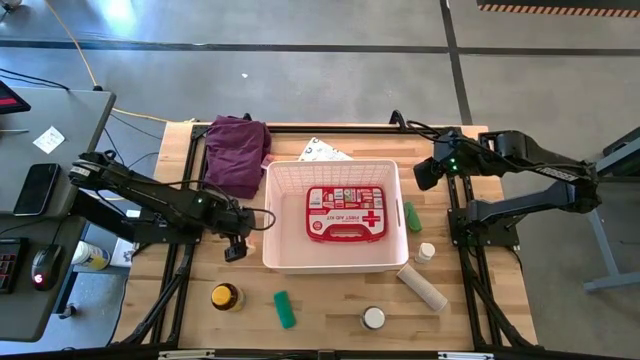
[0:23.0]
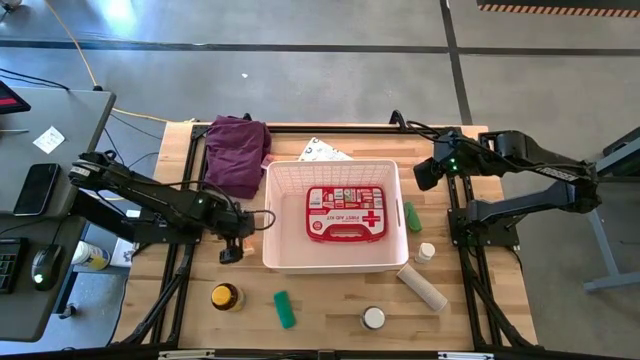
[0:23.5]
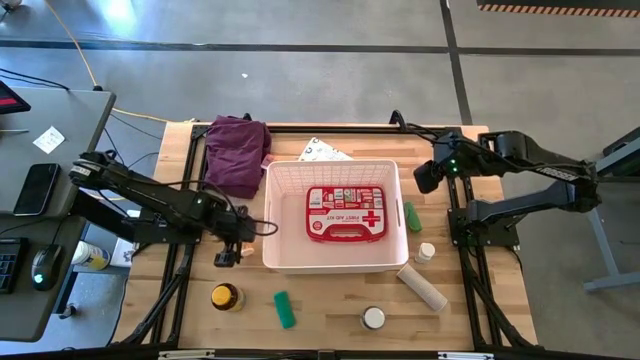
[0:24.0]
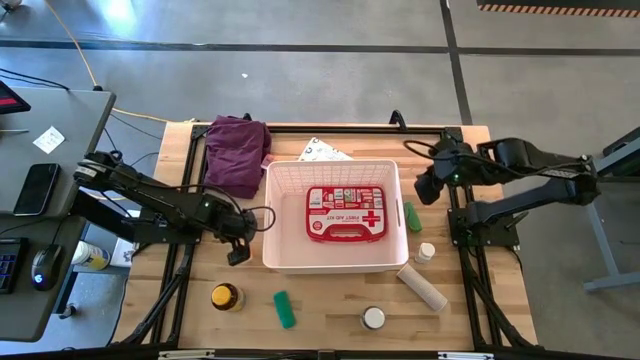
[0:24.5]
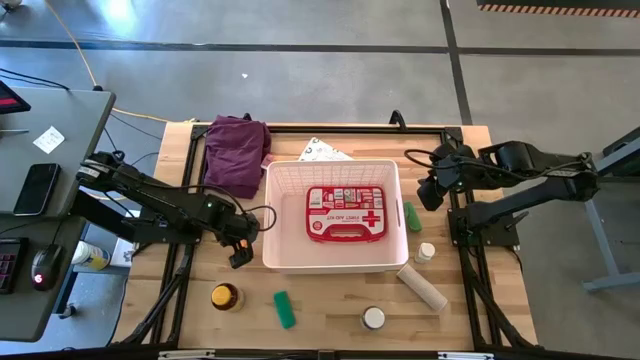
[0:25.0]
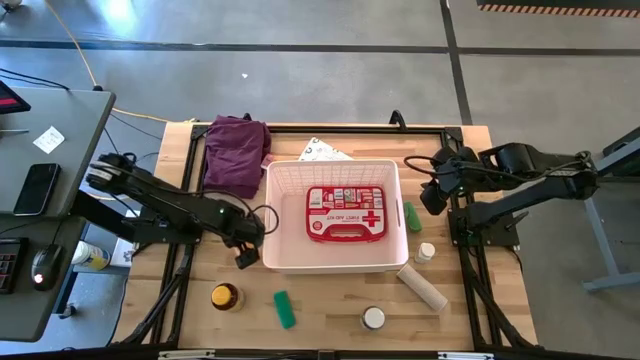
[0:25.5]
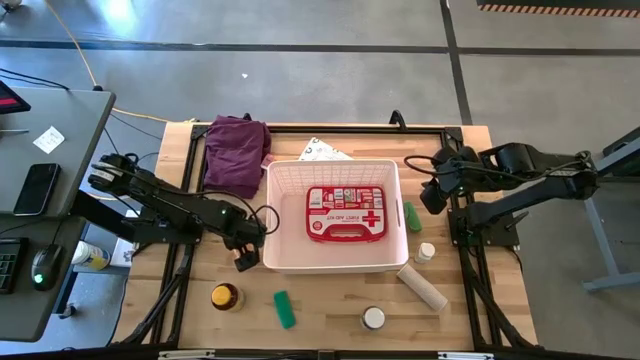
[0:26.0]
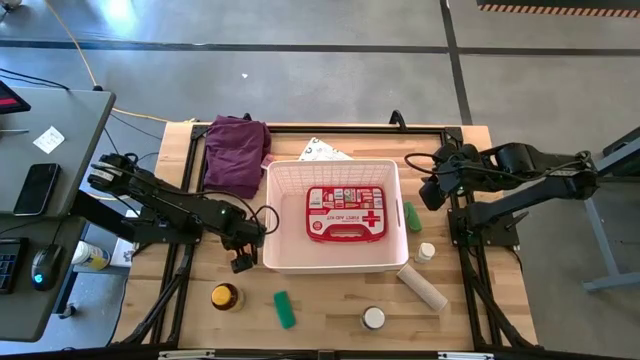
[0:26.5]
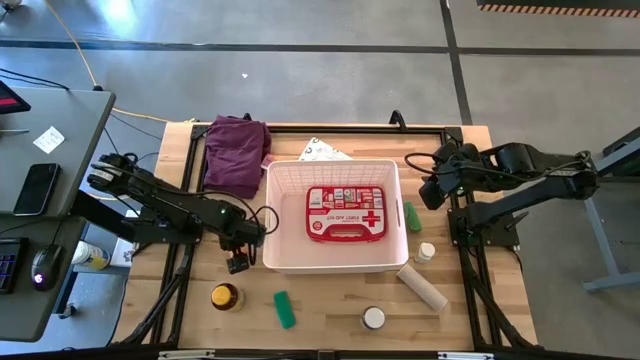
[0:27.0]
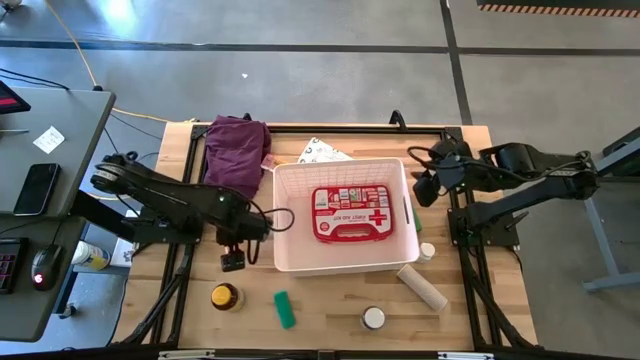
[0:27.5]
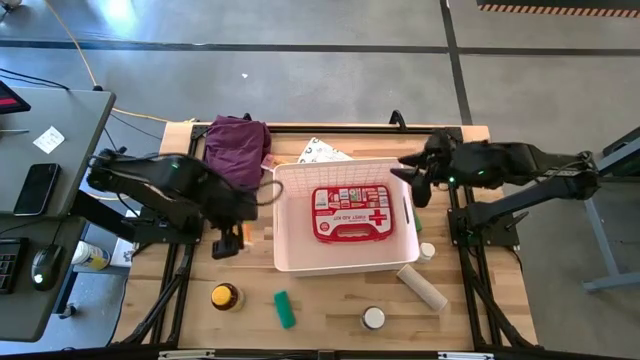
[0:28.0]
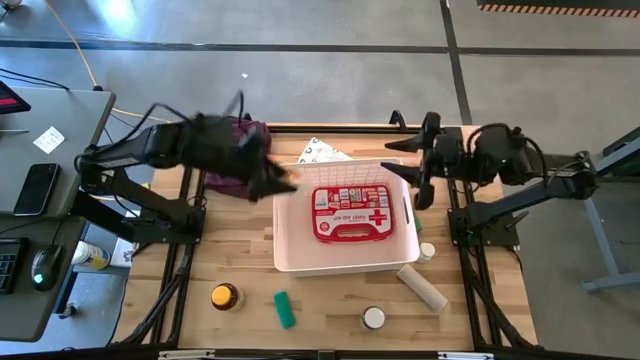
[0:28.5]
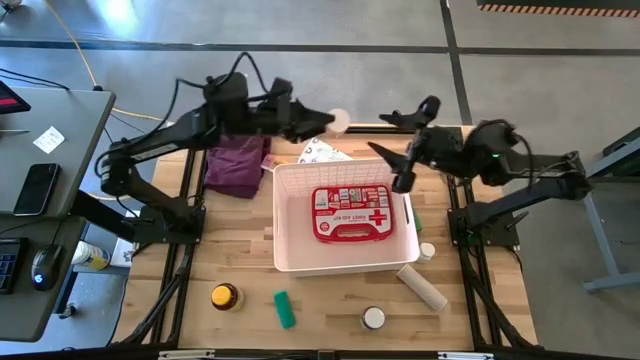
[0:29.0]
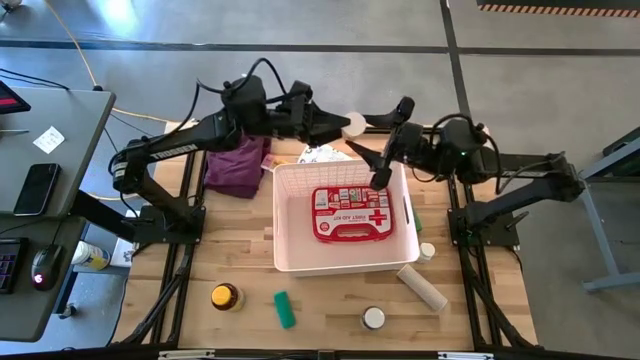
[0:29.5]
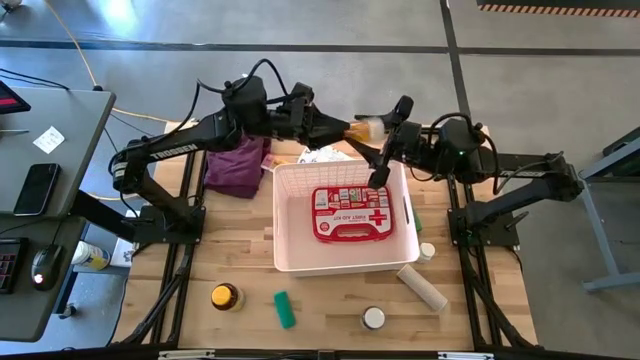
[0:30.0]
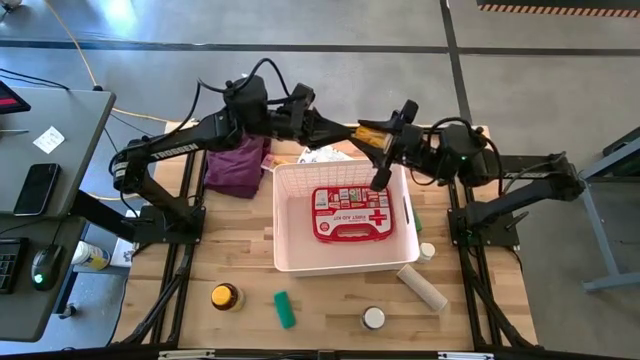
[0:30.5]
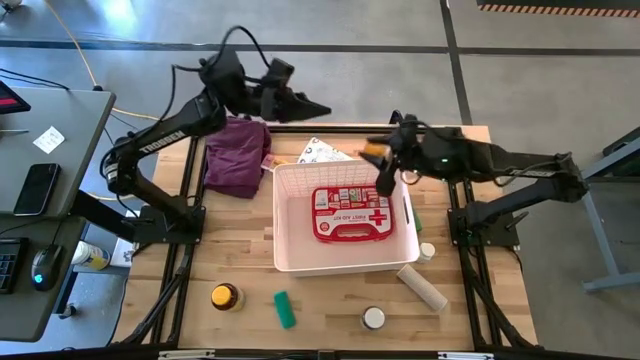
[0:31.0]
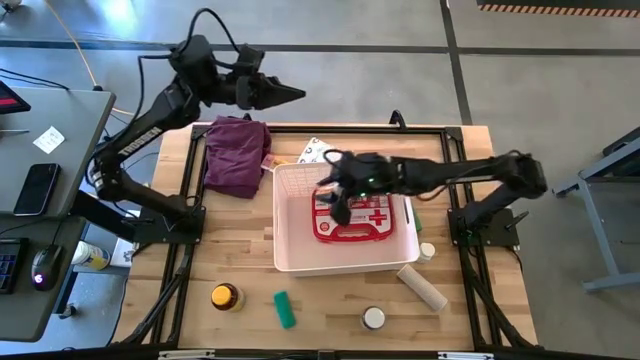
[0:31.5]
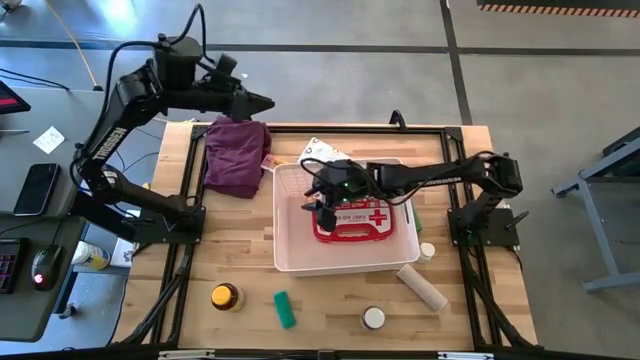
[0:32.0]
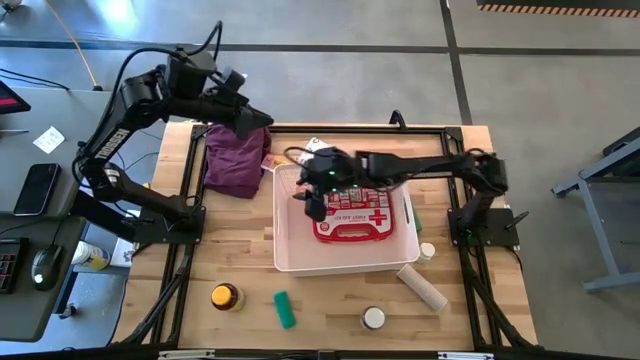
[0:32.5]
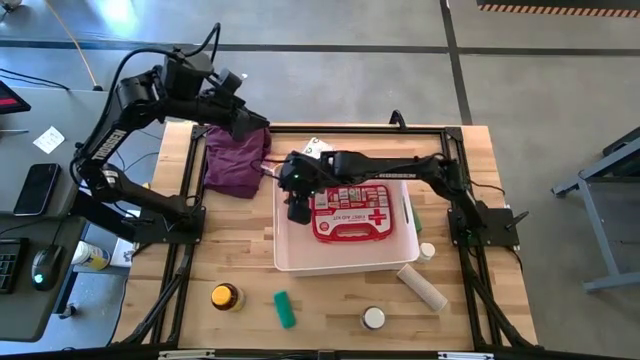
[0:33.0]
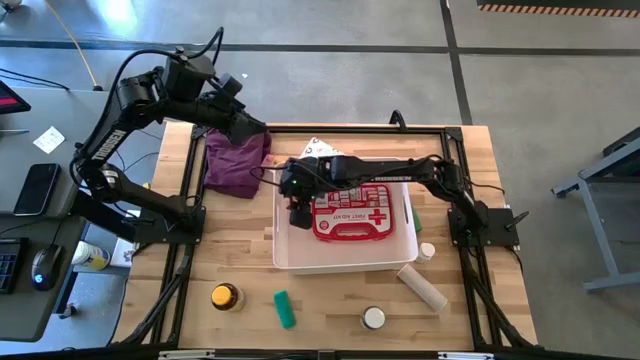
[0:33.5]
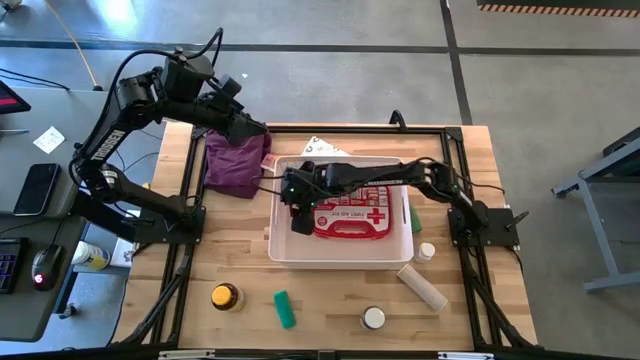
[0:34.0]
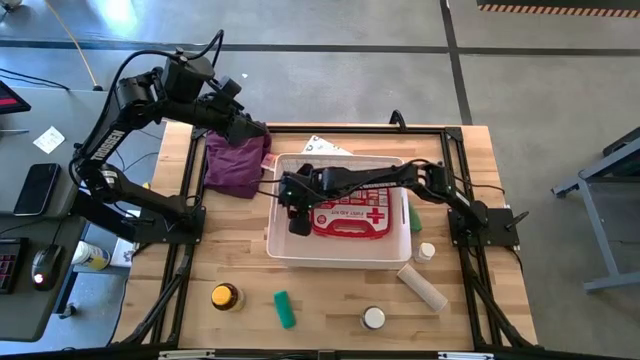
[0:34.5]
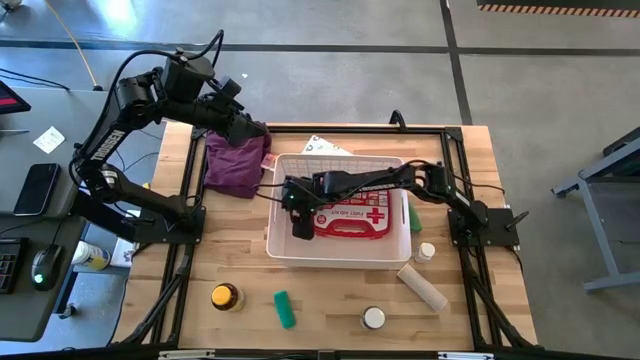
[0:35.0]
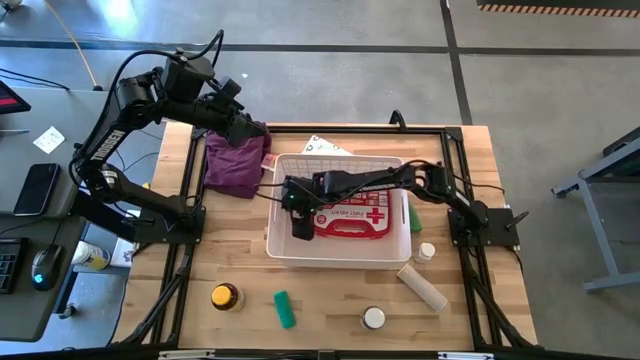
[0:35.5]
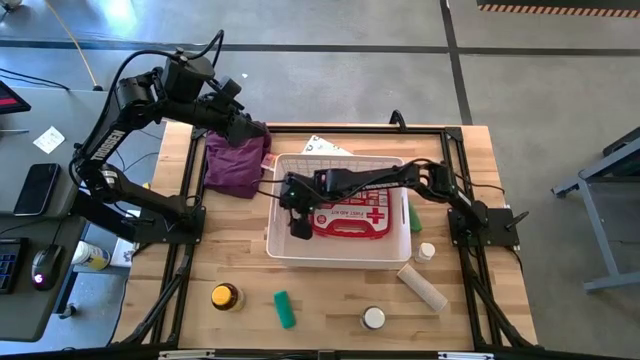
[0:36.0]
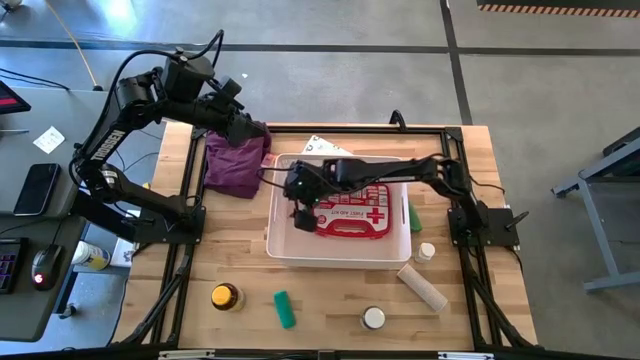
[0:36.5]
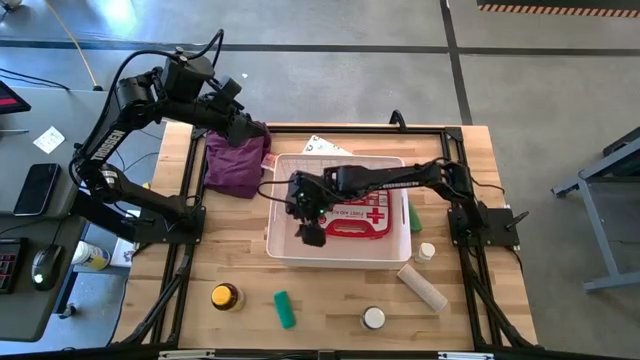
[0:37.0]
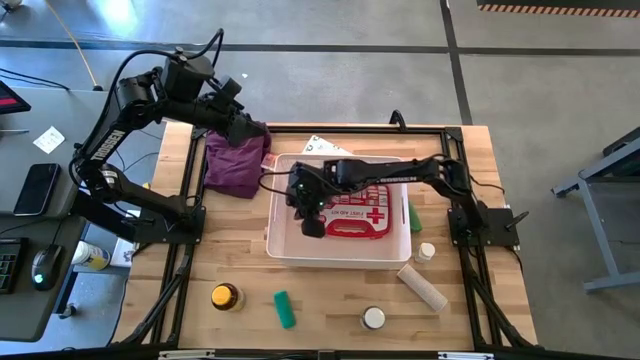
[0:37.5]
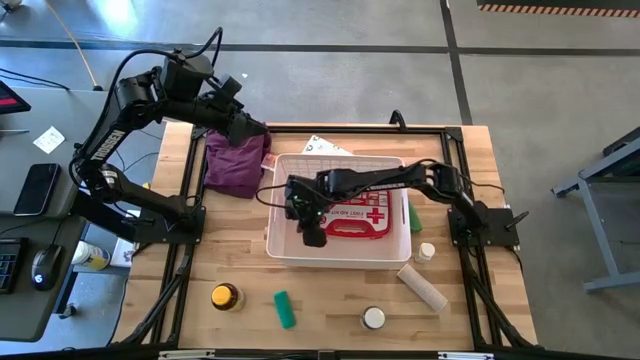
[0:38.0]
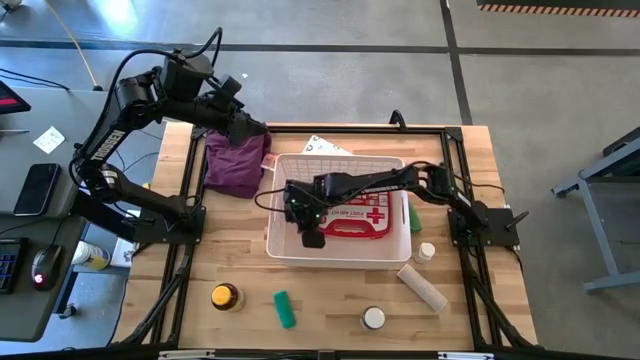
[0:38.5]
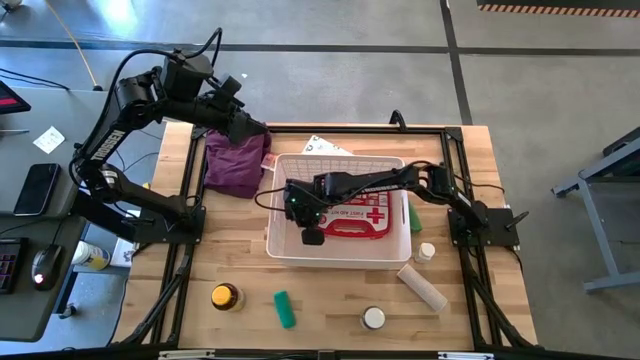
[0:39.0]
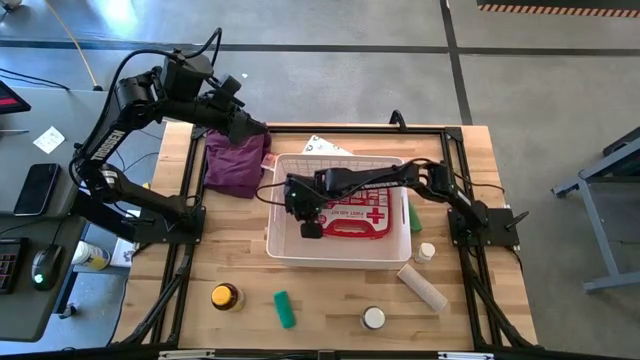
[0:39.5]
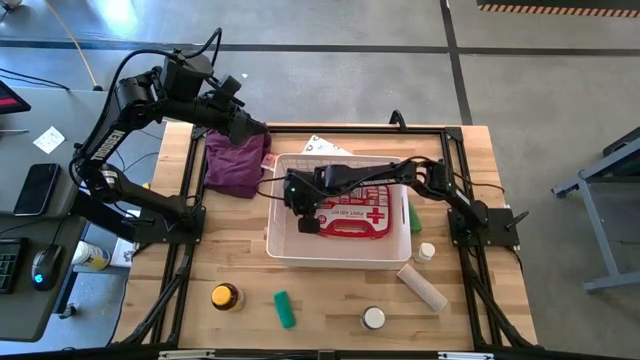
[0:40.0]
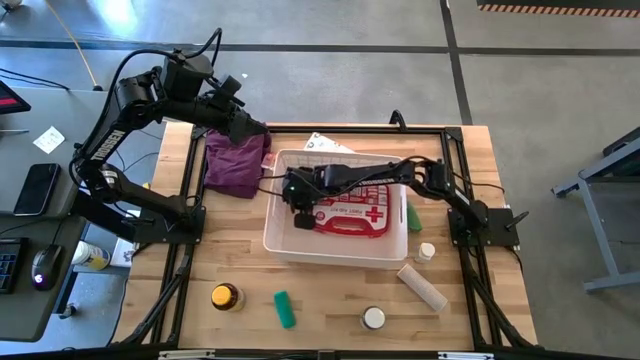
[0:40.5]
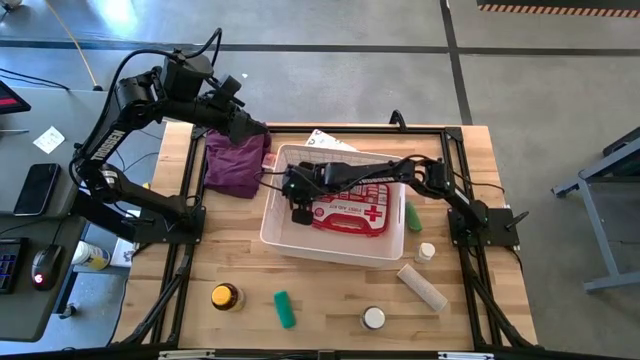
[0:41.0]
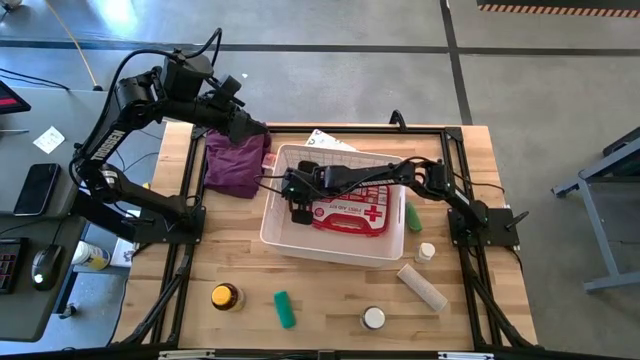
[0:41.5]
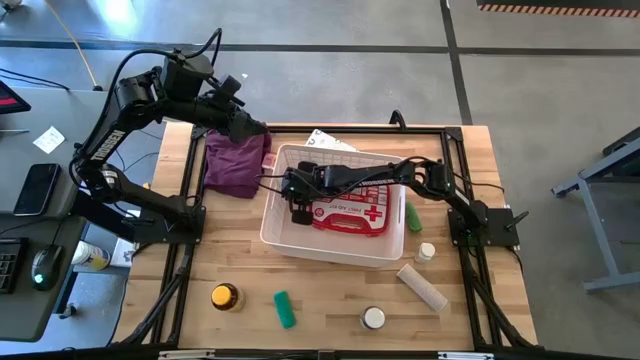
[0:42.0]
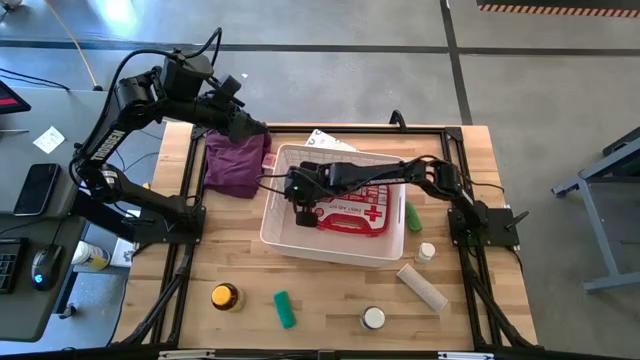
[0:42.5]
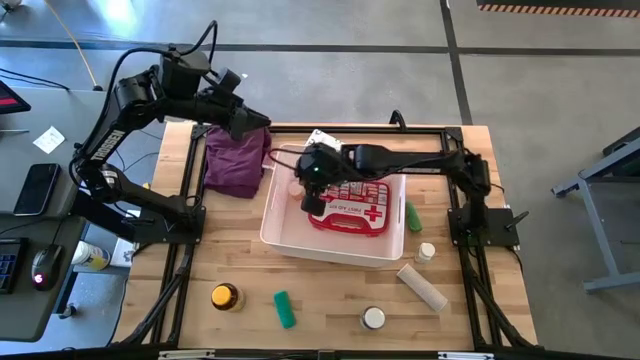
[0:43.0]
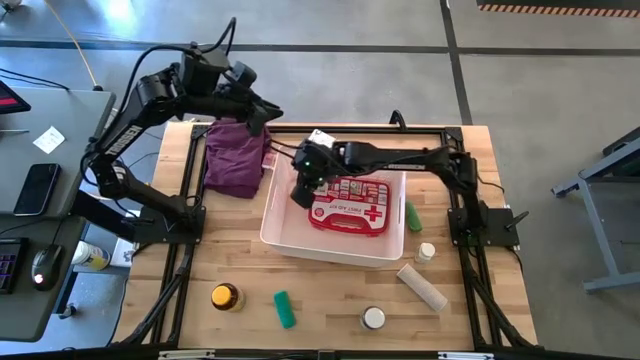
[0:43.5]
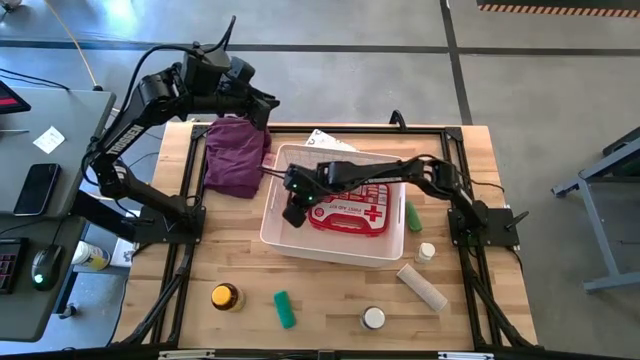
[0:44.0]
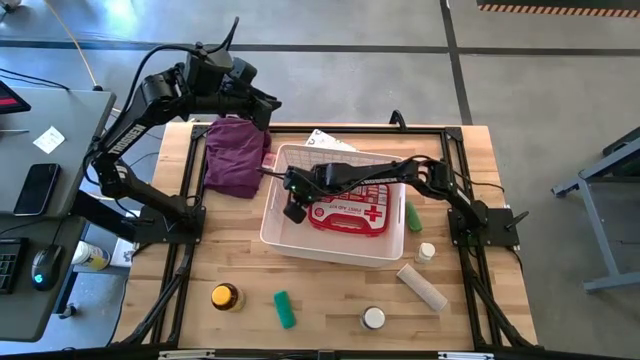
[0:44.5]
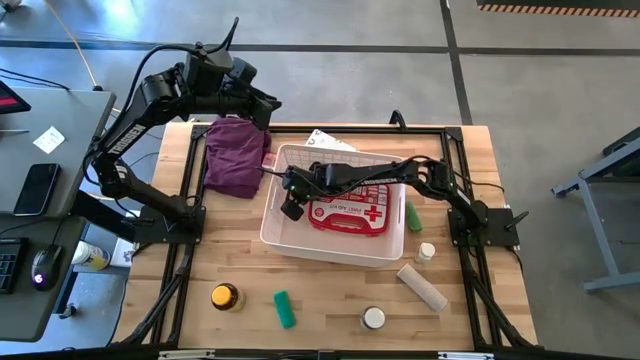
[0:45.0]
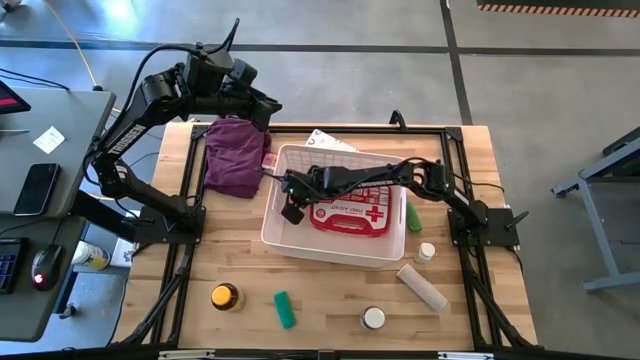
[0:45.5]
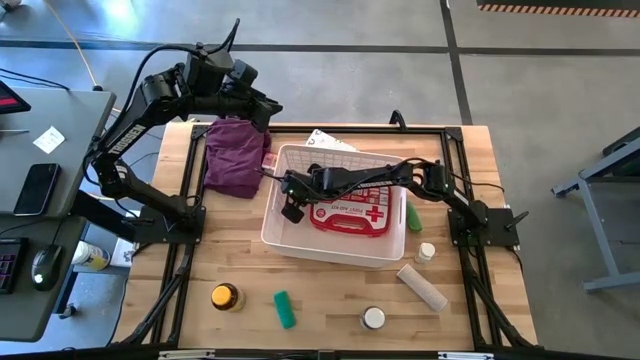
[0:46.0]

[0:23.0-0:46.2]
Task: Pick & place medical supplies in basket/bin
Put the orange medicine bottle into the white bin
